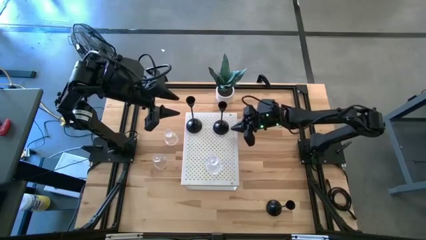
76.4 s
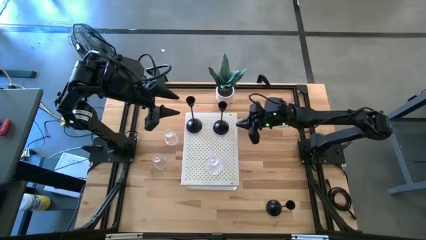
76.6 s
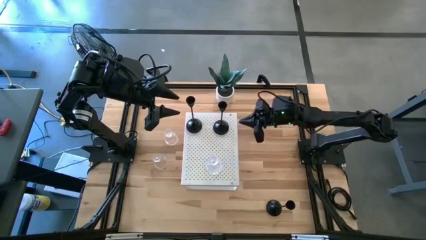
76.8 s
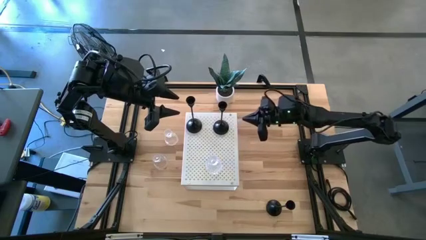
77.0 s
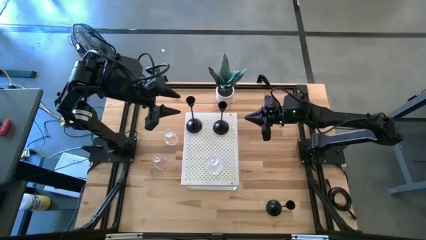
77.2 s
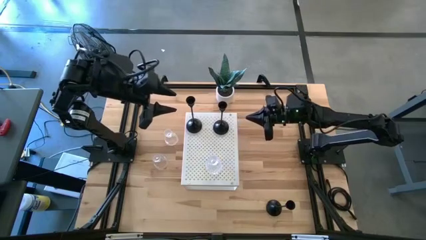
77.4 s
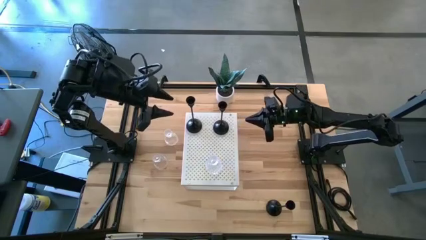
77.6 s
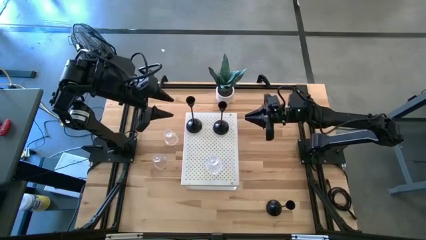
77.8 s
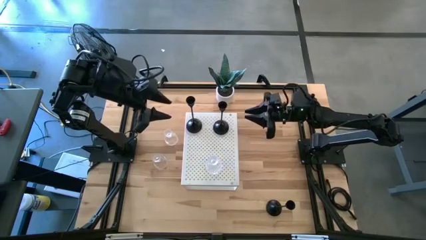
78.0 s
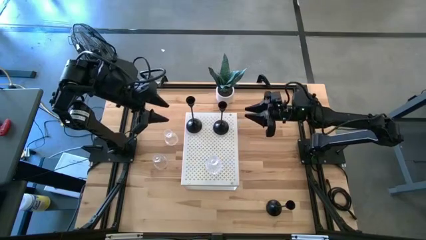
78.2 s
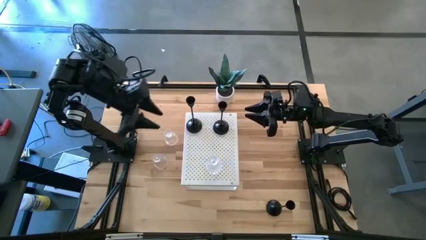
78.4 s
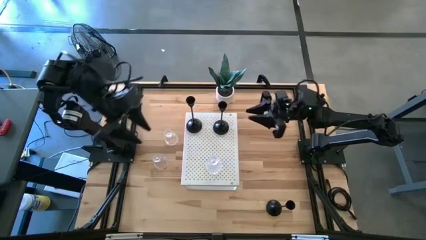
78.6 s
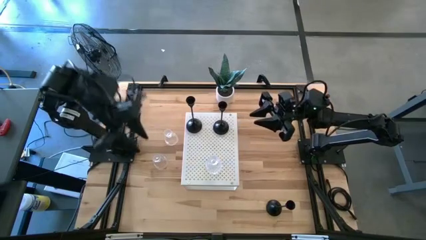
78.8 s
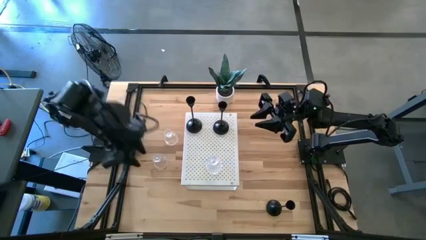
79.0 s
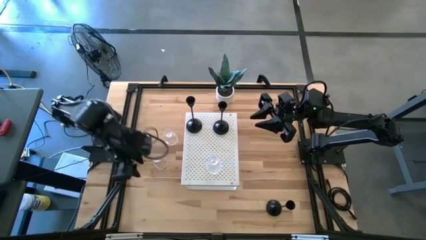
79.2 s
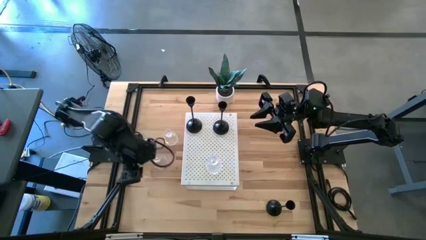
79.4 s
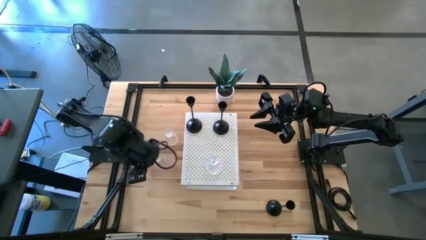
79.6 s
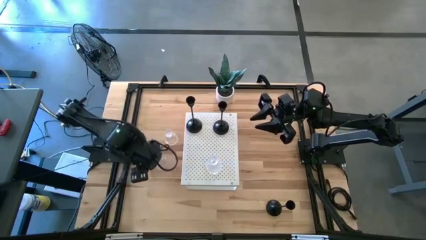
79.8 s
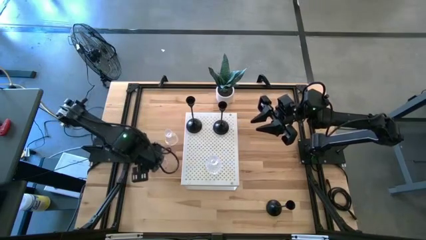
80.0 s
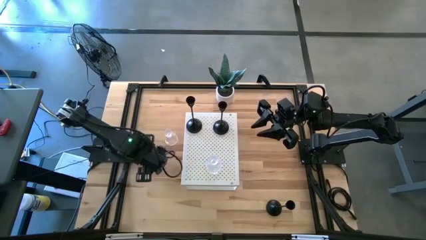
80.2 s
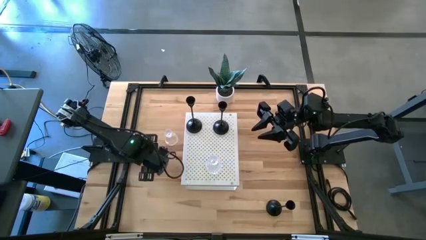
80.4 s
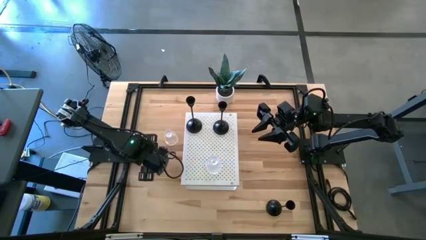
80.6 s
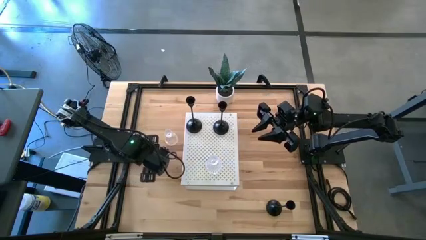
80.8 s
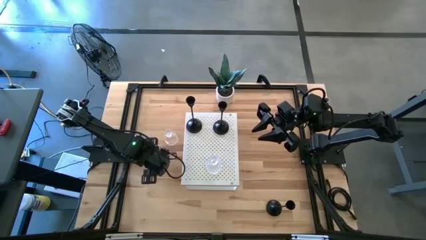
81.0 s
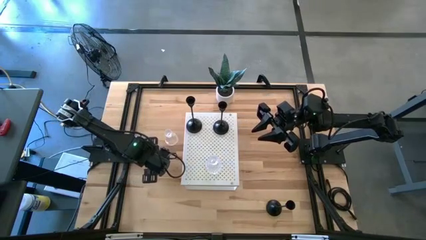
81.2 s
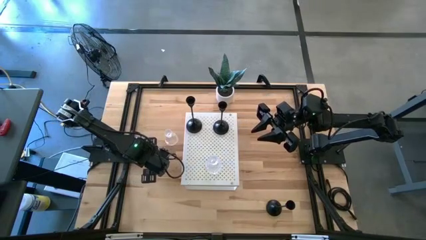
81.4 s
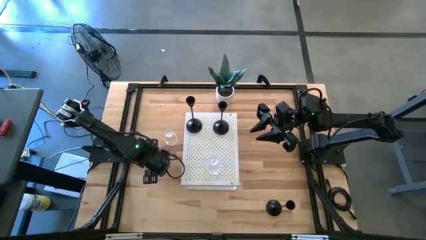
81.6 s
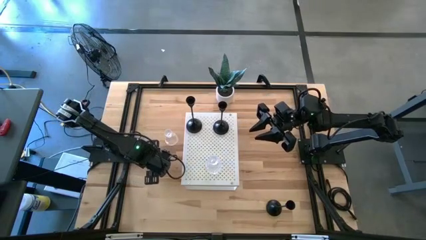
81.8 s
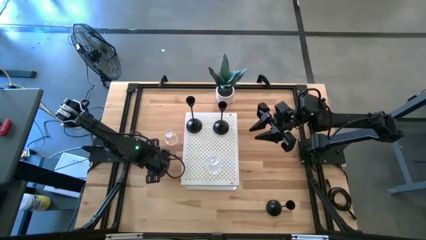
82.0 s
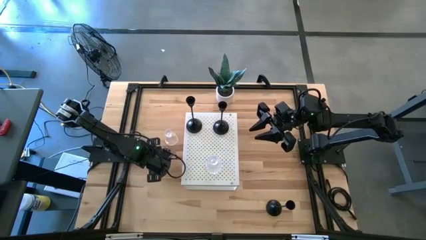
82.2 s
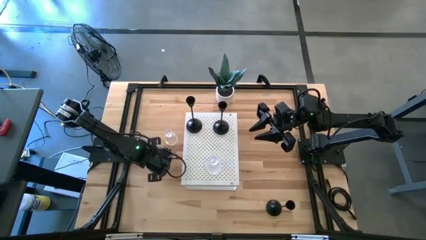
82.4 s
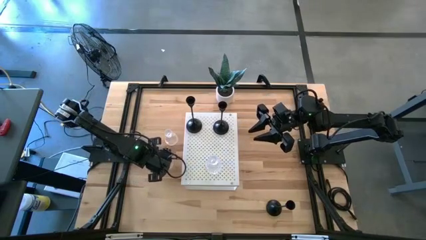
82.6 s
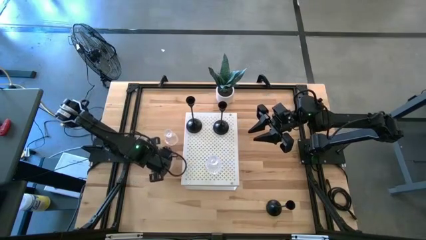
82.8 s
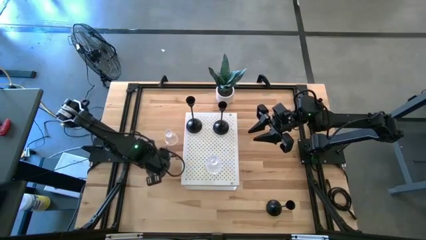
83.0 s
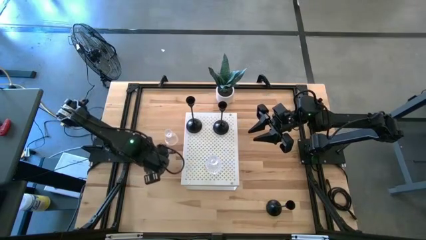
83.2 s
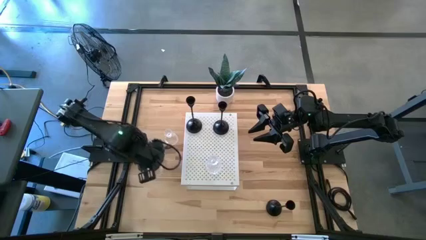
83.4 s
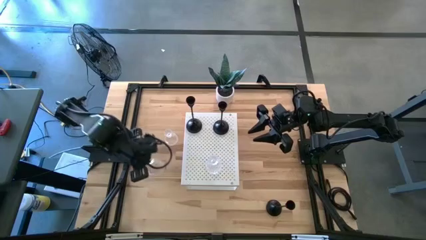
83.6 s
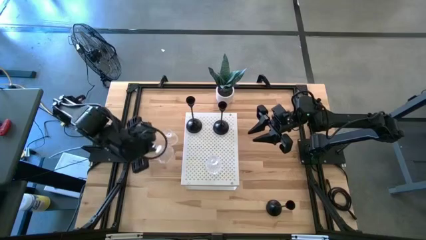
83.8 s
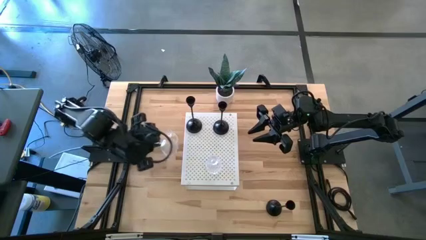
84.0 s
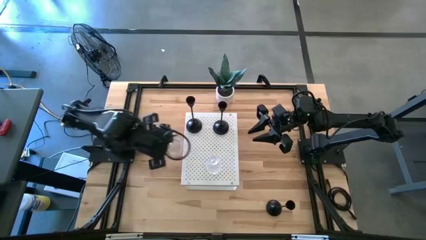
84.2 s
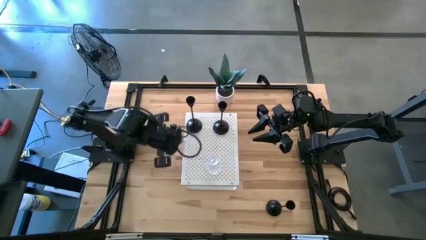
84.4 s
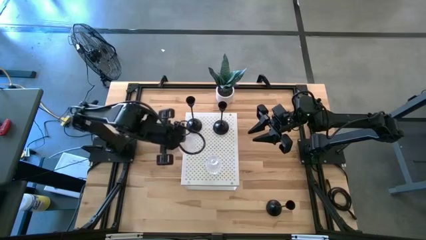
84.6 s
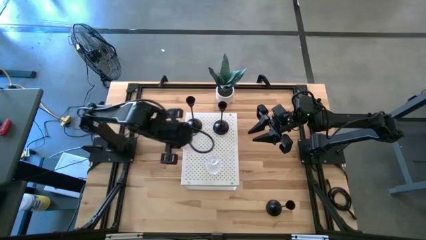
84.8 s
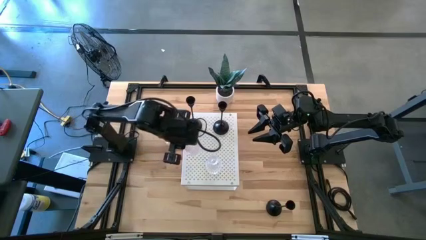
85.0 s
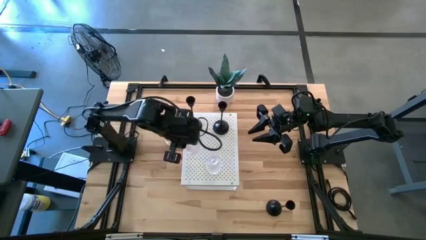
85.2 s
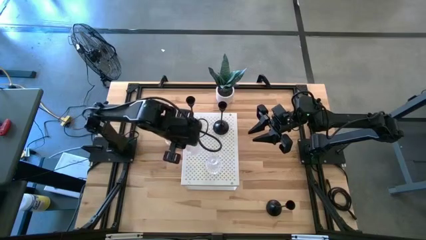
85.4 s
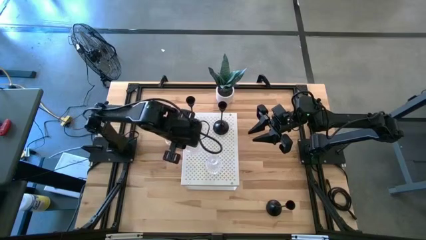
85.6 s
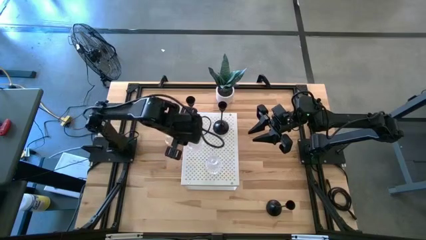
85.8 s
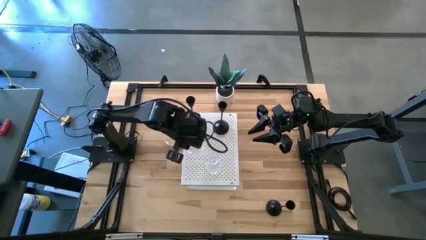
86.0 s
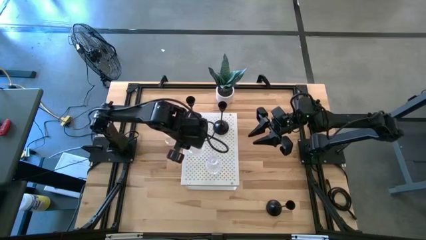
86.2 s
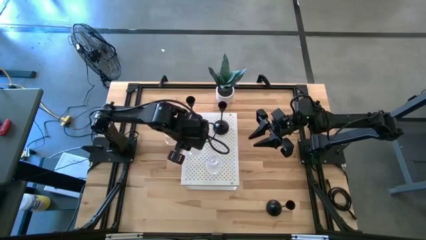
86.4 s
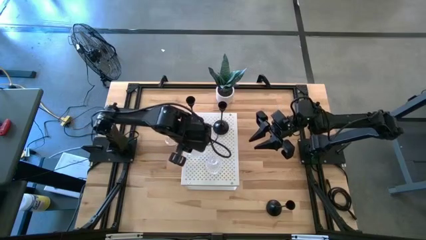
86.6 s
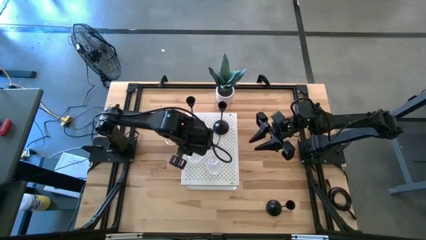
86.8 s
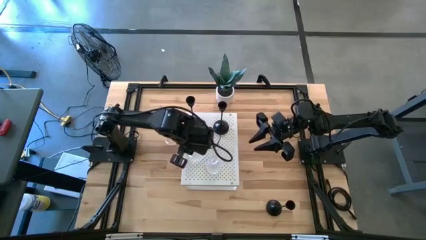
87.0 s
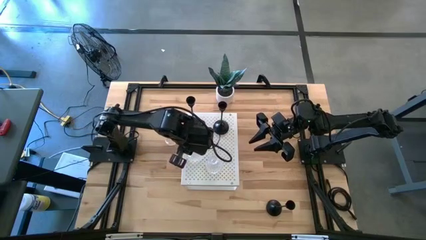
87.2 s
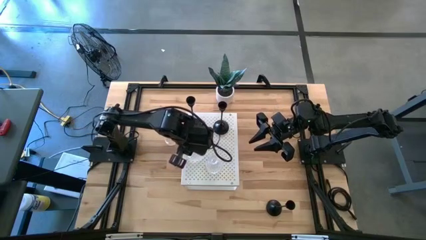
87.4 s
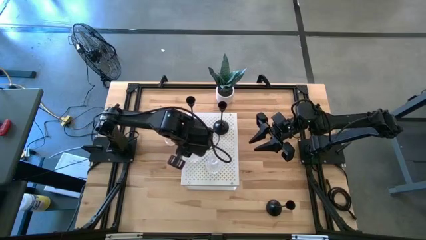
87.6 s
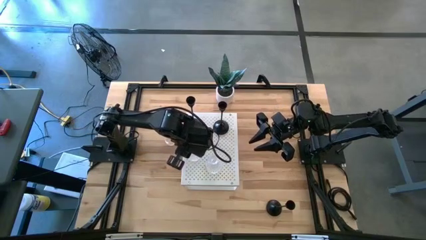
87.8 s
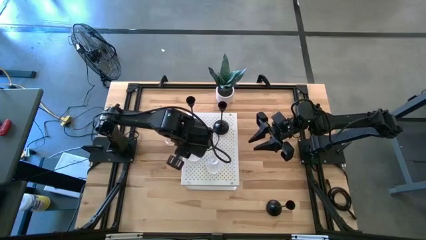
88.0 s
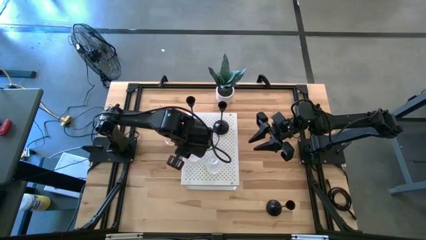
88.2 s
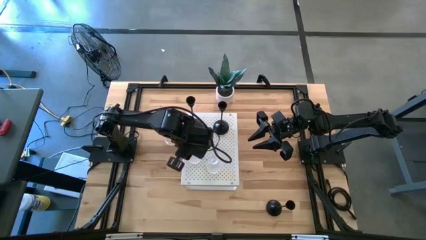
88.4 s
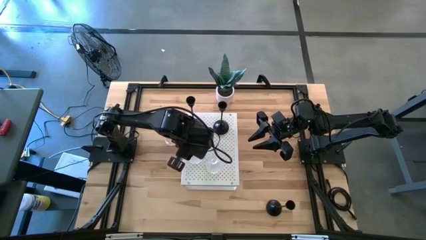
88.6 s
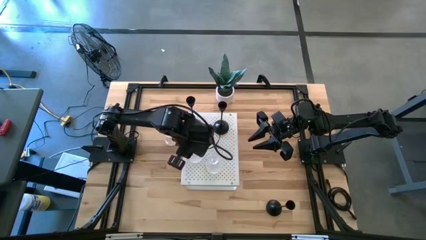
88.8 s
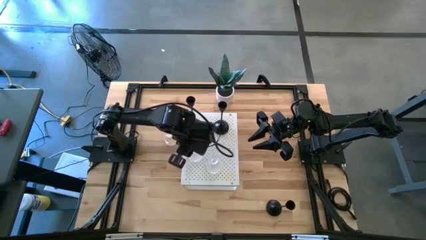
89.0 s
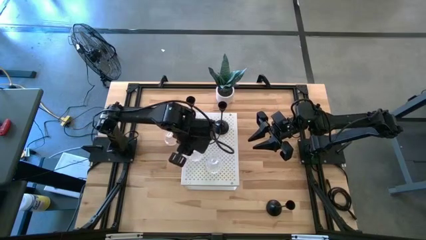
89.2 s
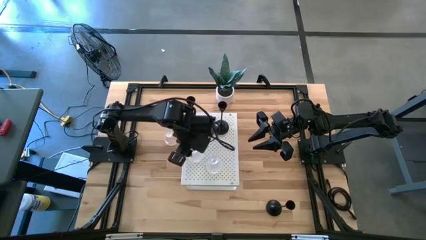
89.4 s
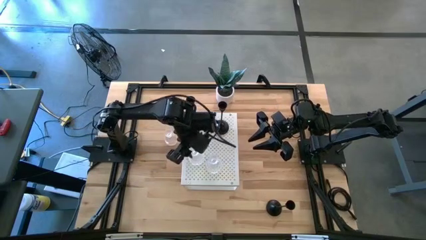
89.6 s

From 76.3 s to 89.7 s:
Task: Pick & Place candle stick holders
Put the bottom transparent glass candle holder on the shelf

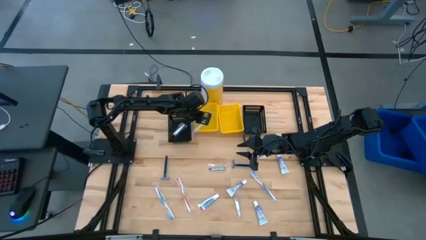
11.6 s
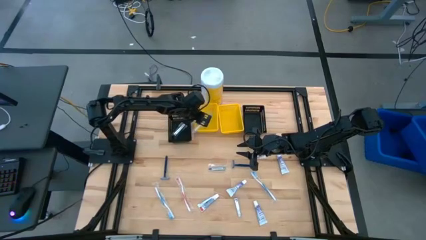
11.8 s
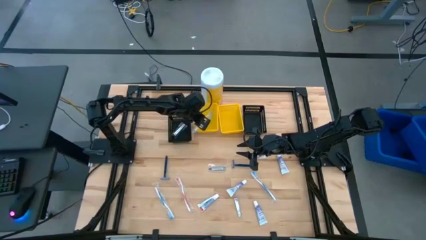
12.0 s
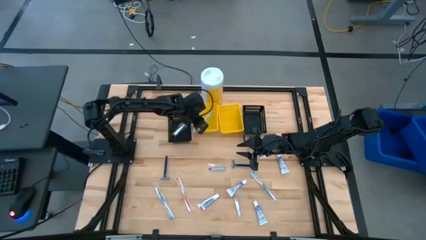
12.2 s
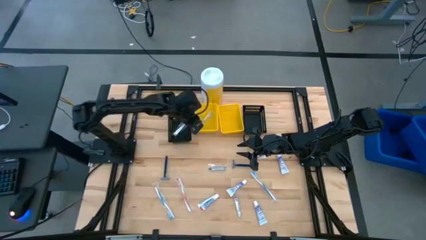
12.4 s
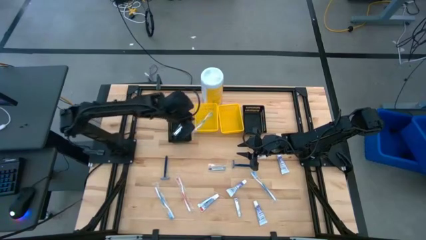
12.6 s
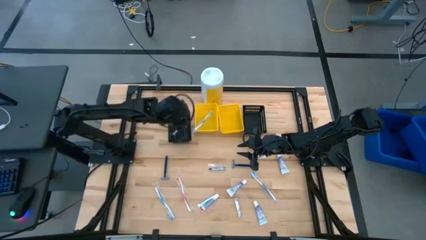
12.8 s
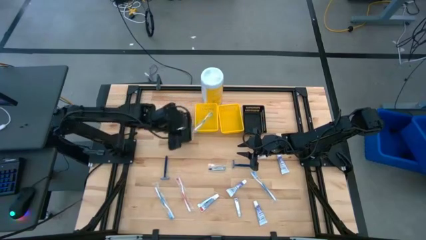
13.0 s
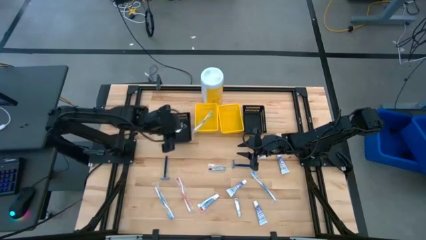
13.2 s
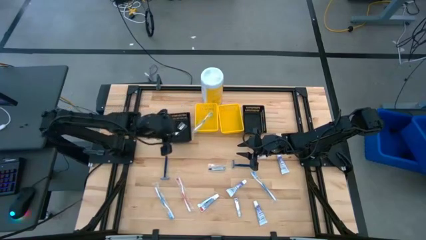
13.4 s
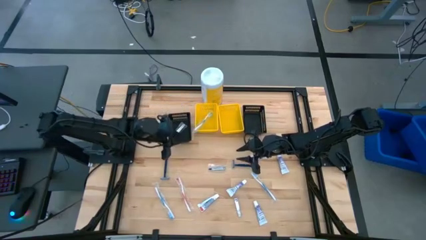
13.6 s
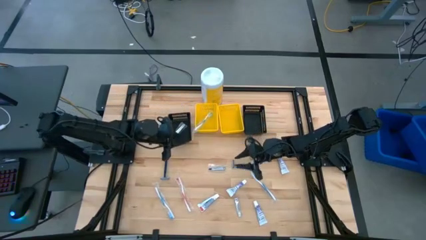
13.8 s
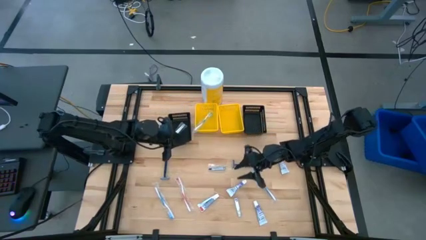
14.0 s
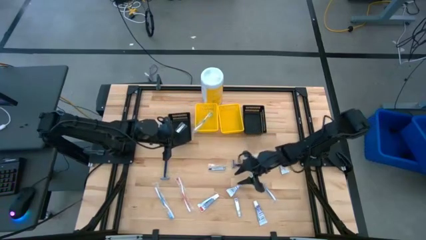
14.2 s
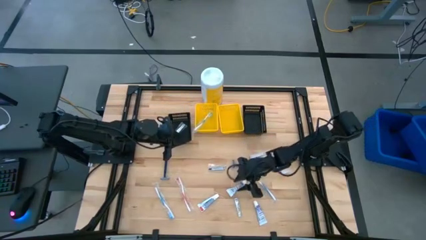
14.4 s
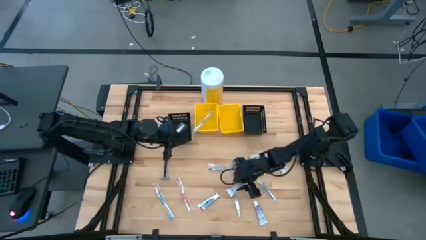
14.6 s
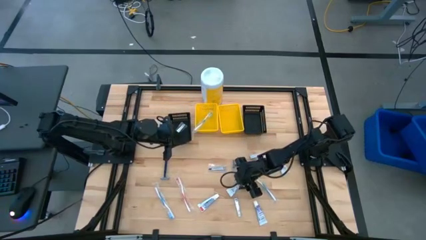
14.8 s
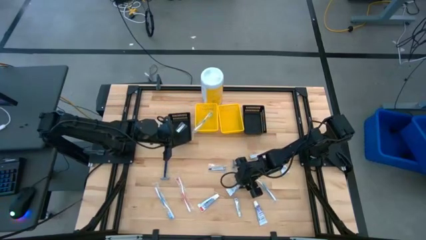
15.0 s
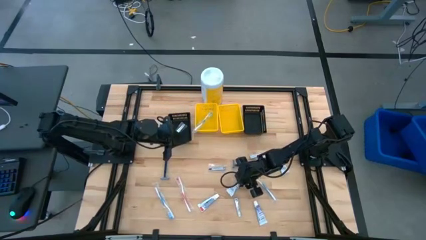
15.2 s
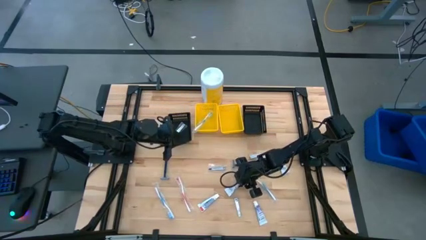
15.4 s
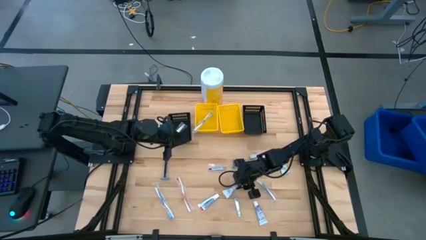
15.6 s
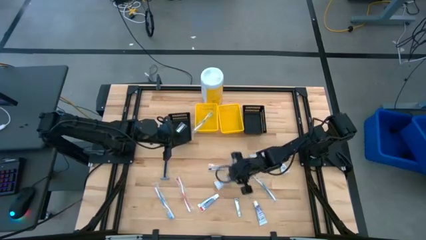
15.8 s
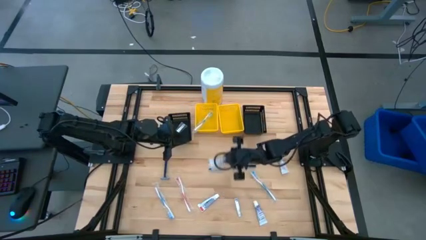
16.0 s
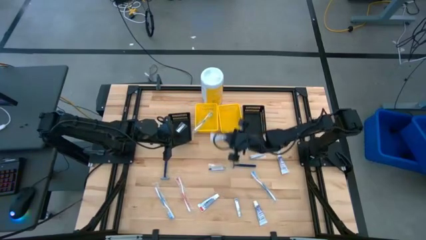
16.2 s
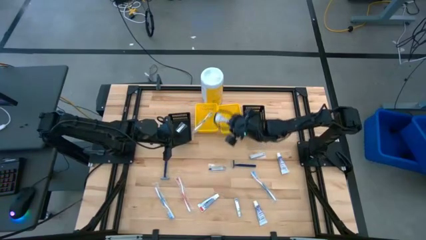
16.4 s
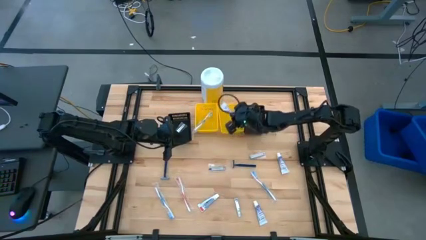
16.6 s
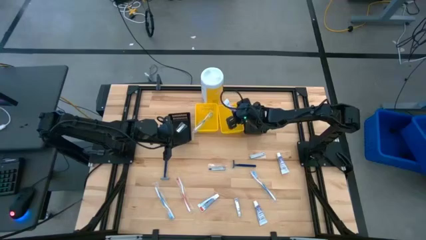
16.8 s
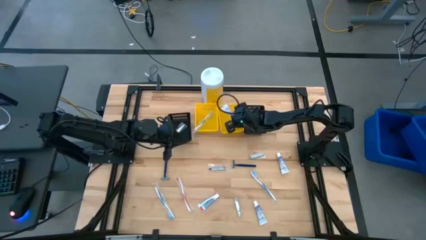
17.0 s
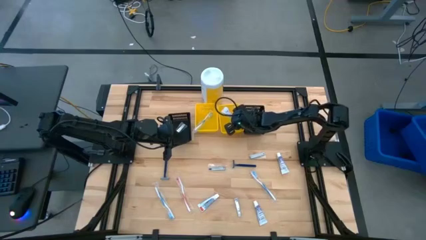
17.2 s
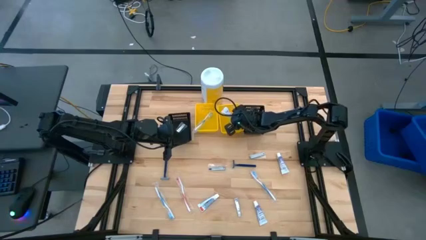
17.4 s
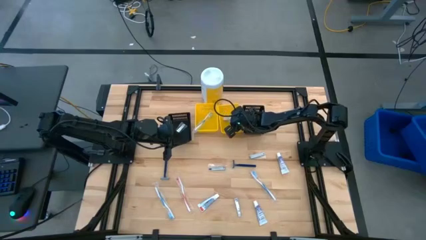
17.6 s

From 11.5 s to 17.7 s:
Task: Pick & Place Travel size toiletries
Put the white toothpaste into the right yellow bin
